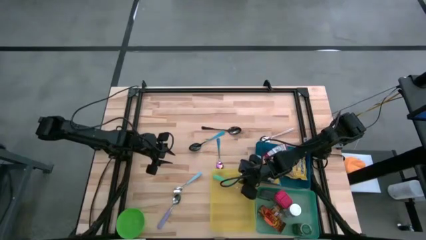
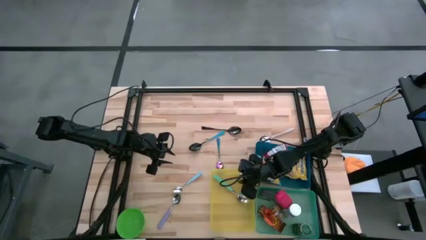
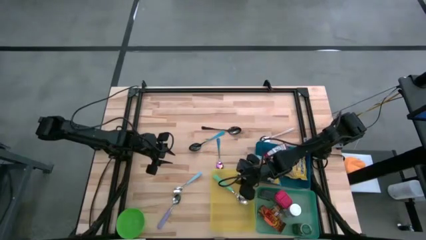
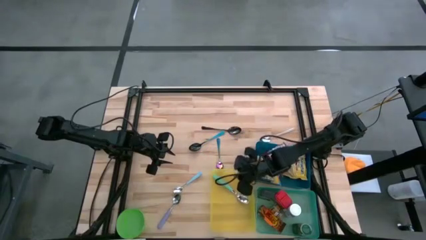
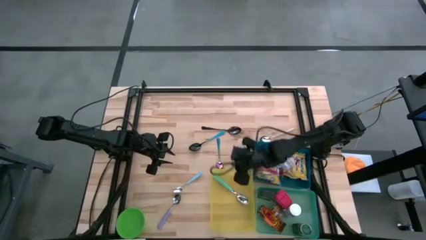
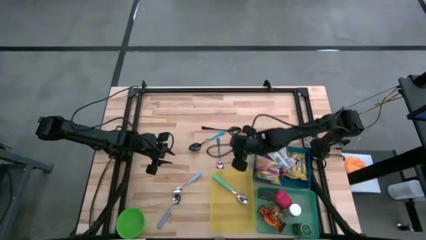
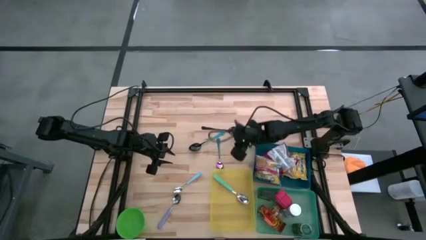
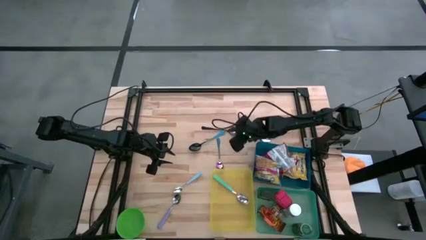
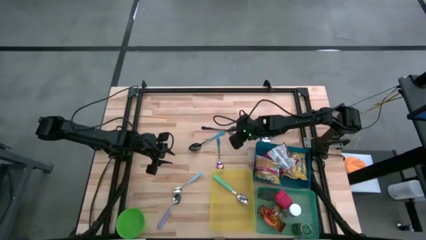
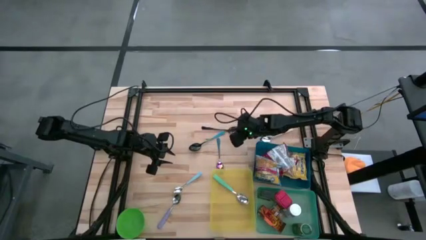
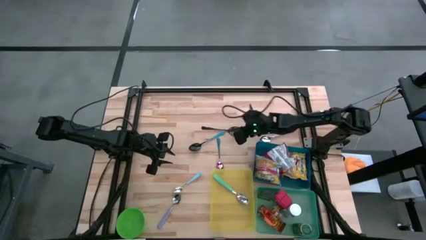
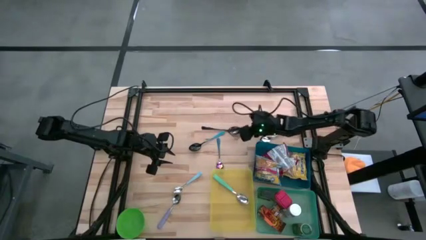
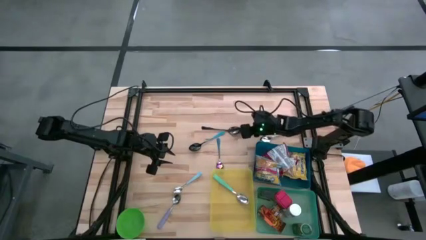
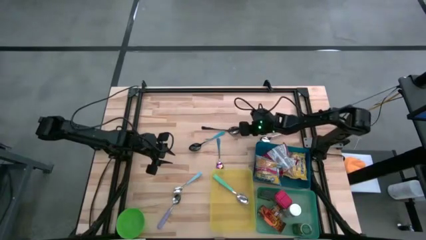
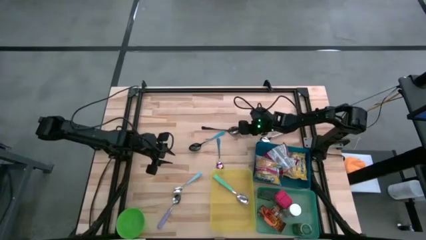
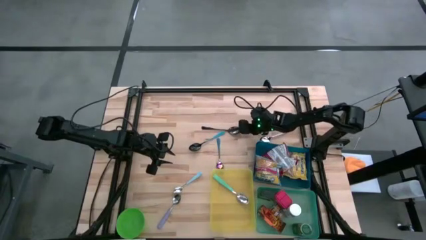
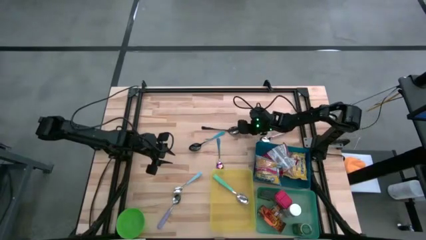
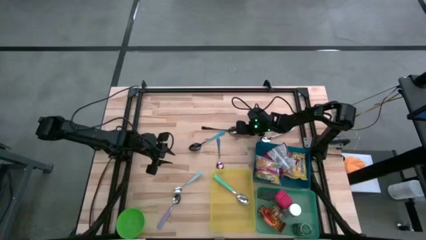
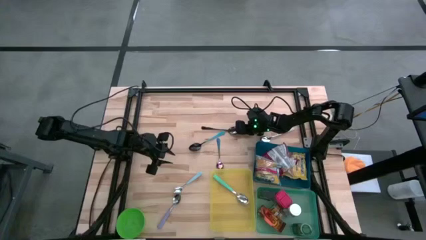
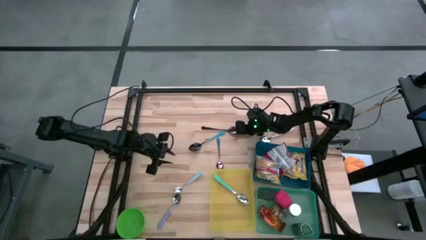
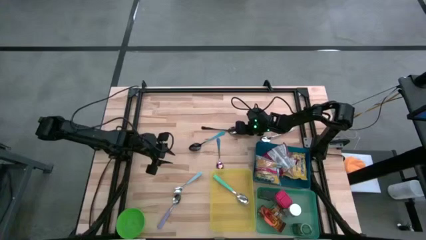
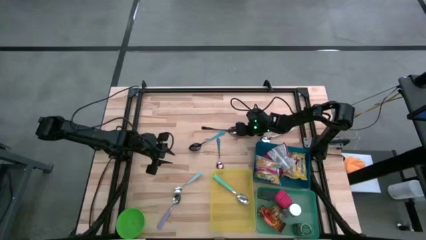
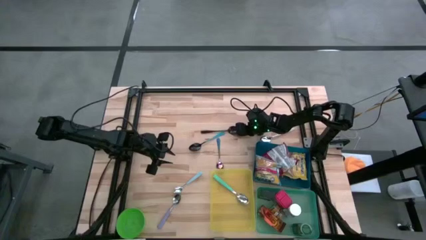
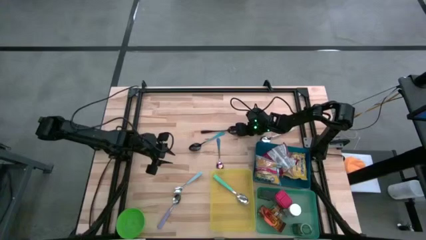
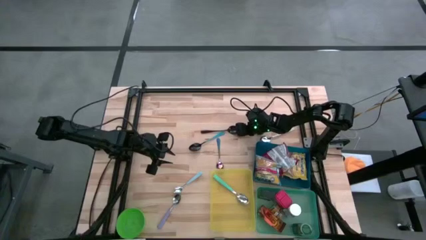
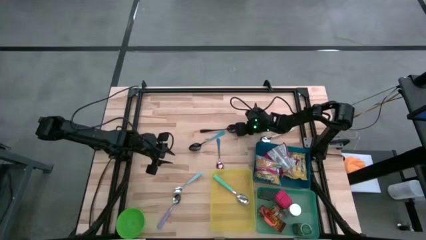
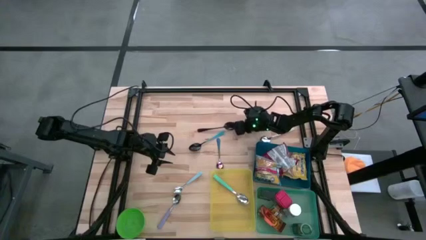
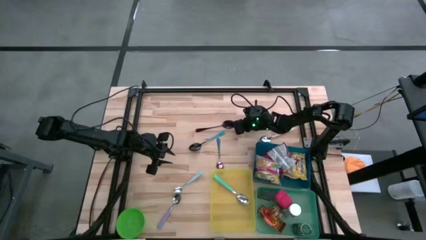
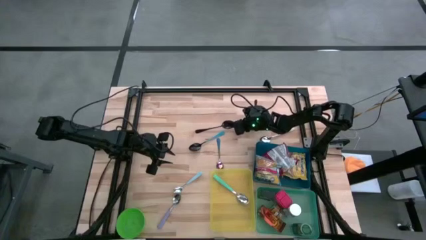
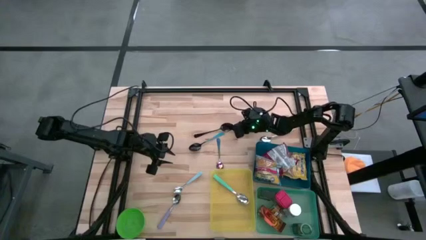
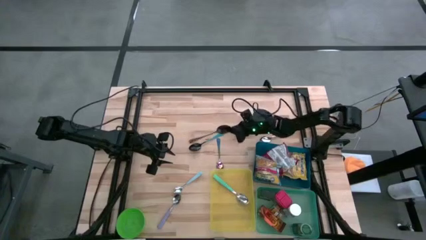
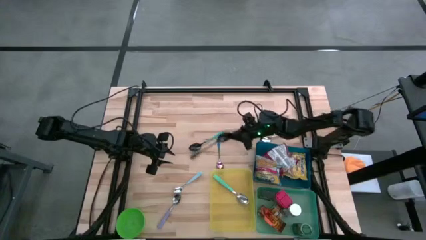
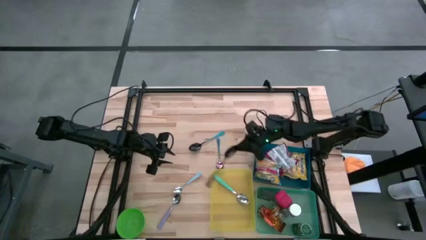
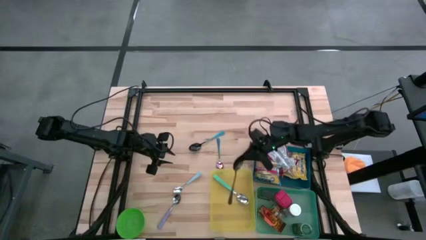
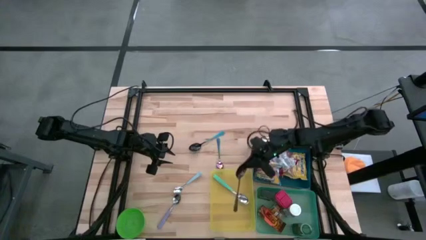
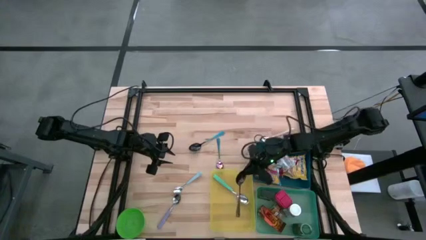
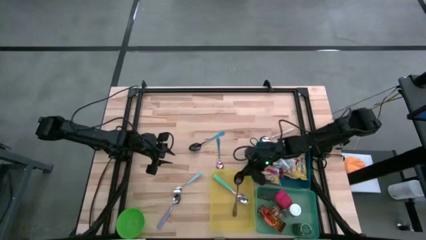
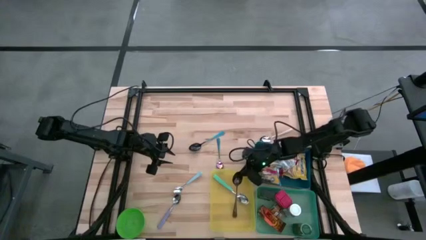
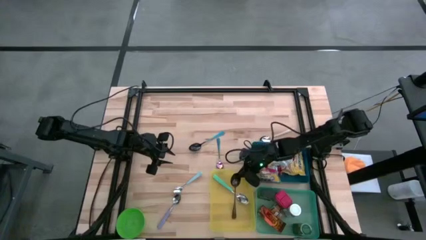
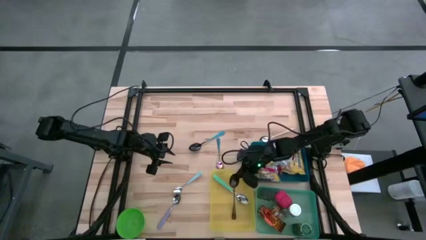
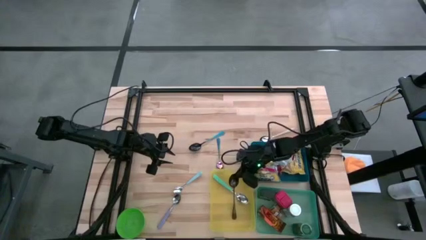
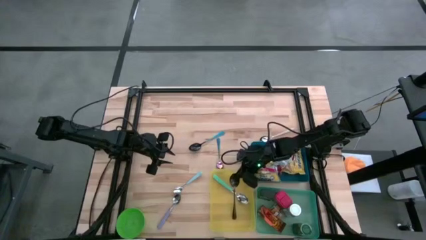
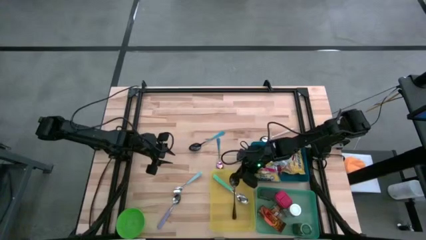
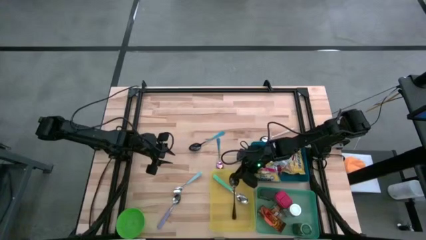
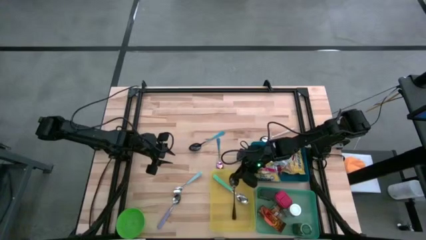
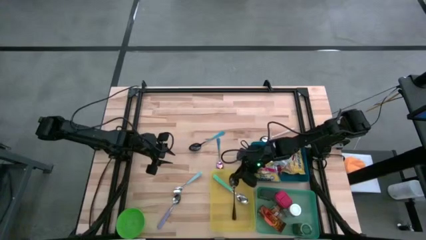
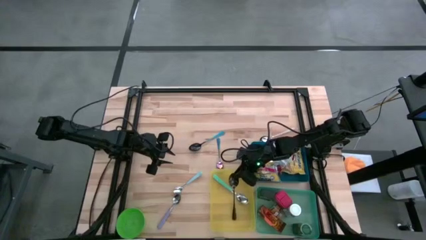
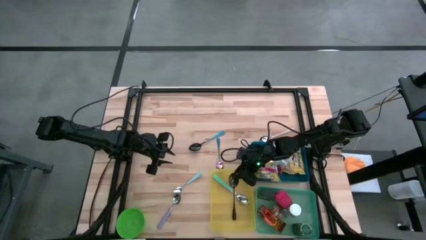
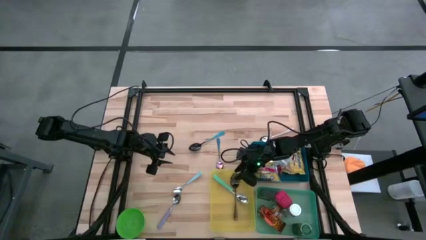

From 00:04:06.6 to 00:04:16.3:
Put the black spoon into the yellow bin

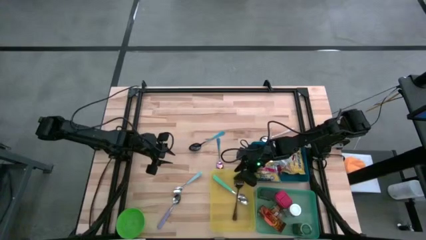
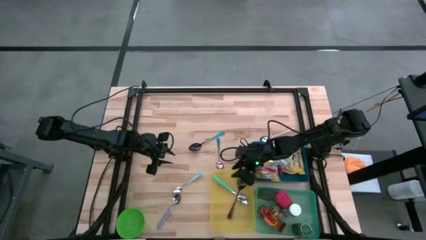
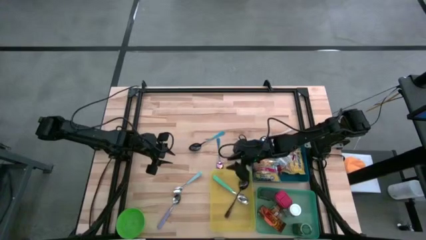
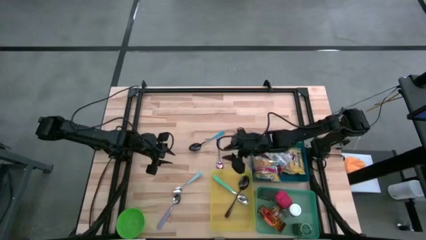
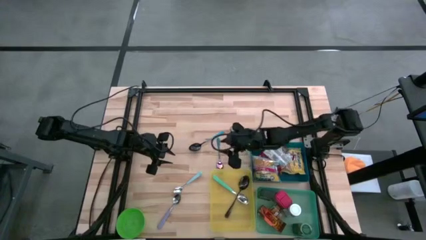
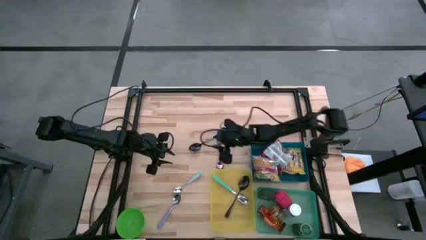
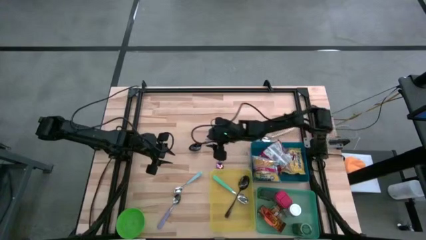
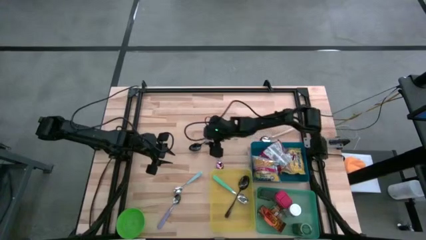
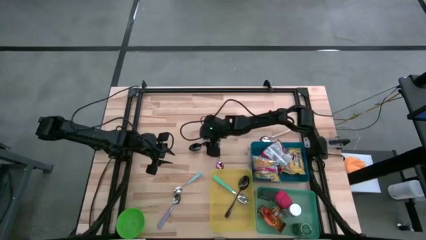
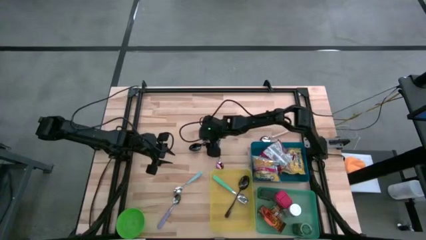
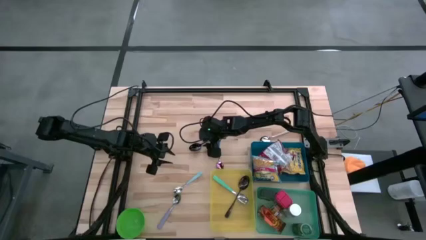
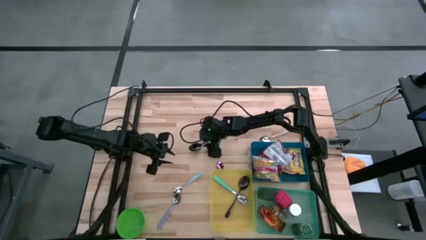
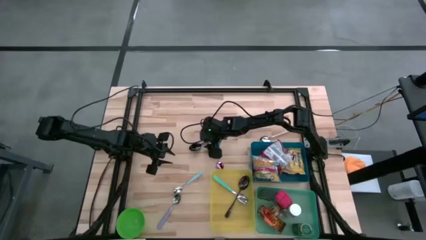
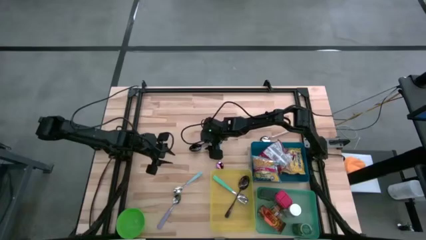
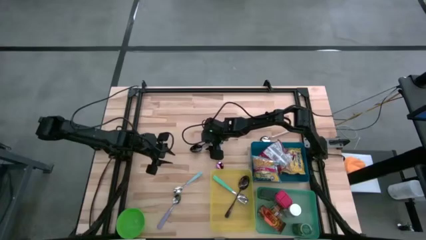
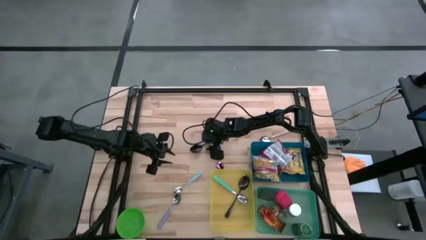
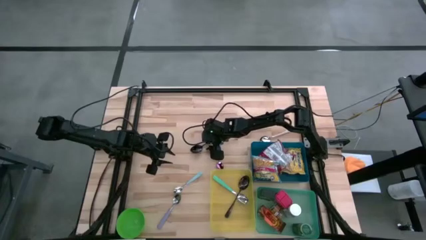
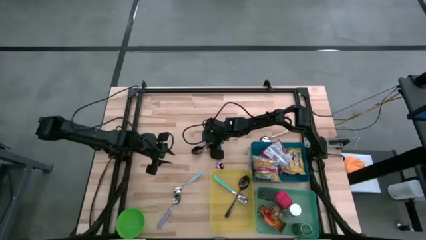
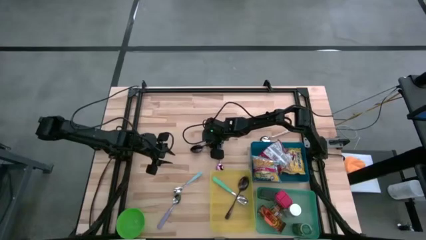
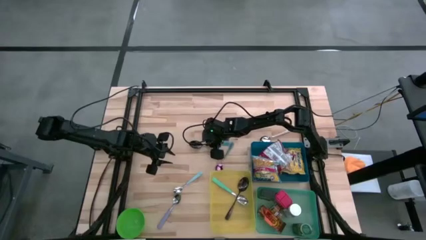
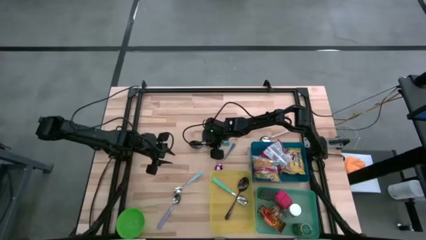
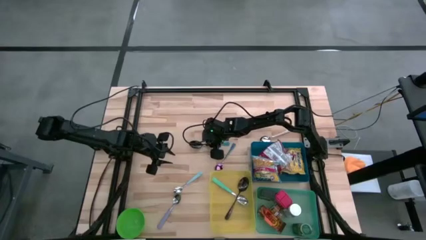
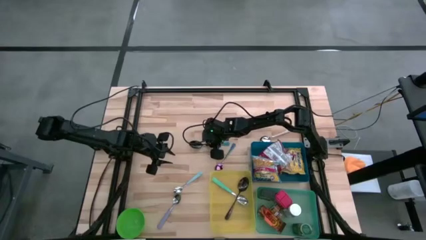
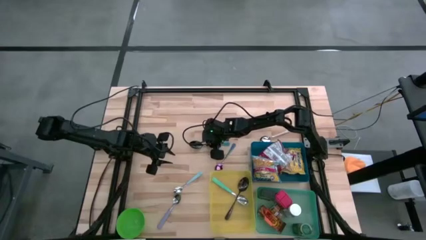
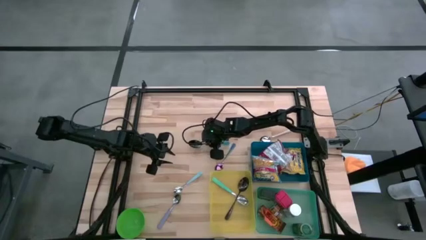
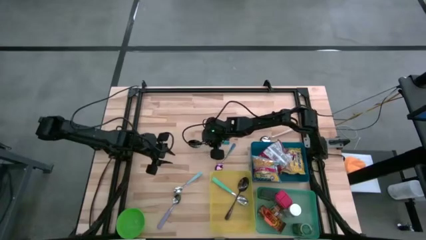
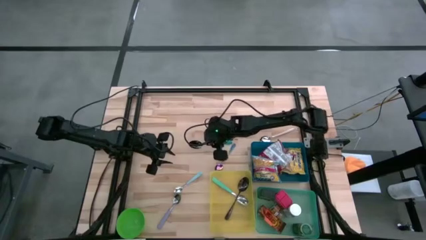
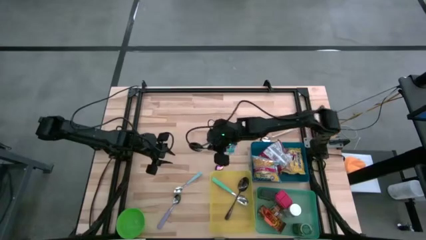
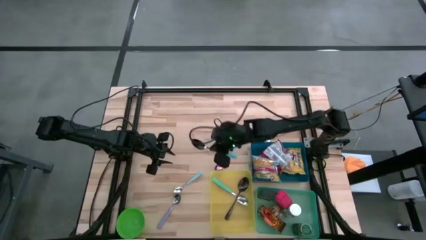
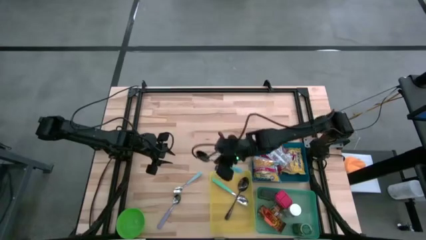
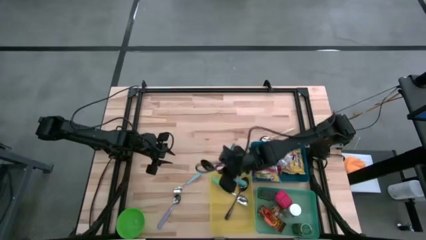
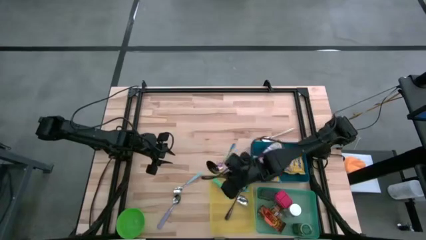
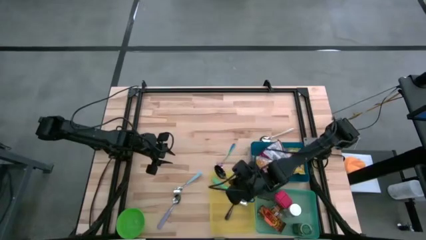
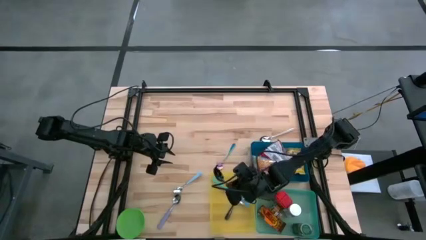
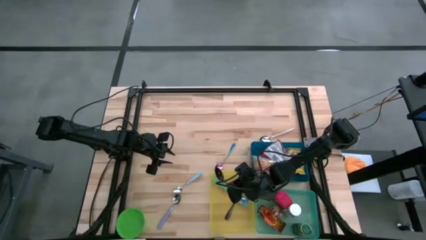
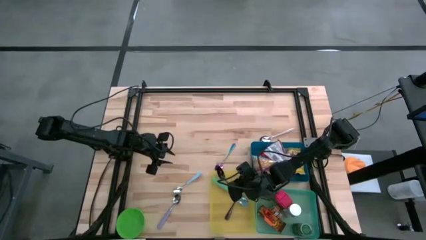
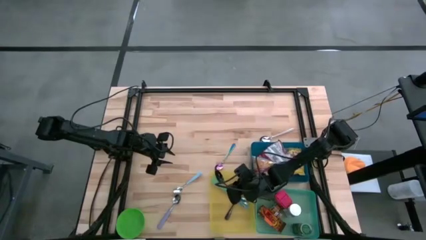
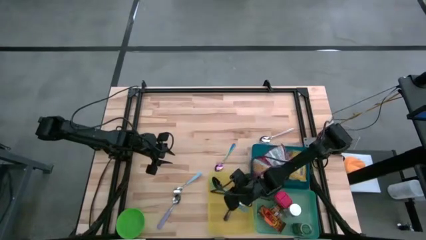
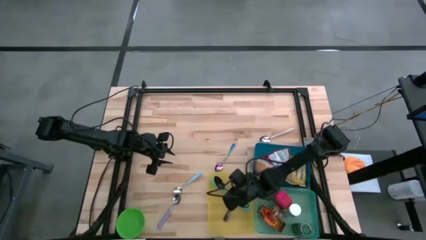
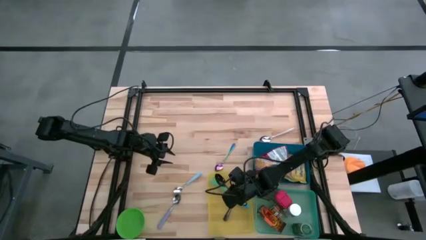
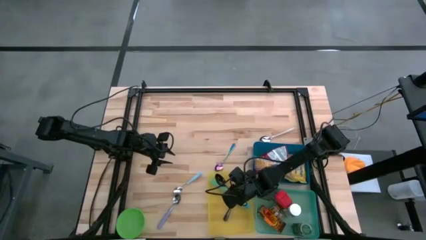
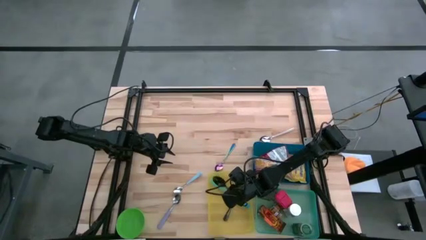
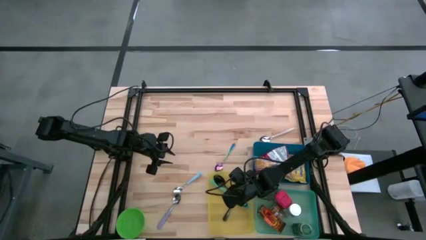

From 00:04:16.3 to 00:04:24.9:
Put the blue spoon into the yellow bin
